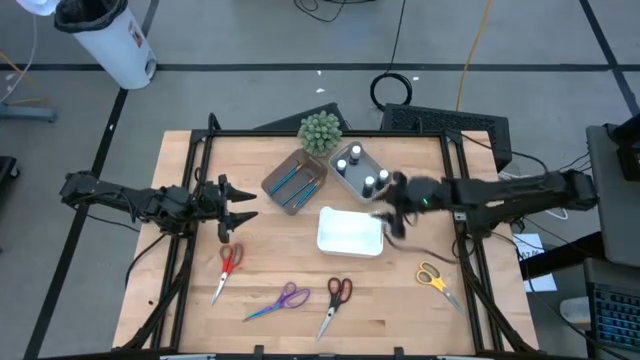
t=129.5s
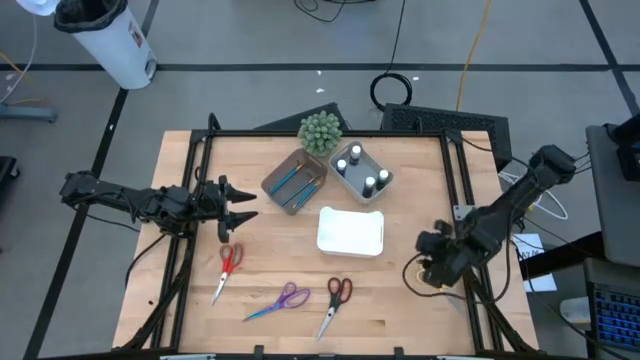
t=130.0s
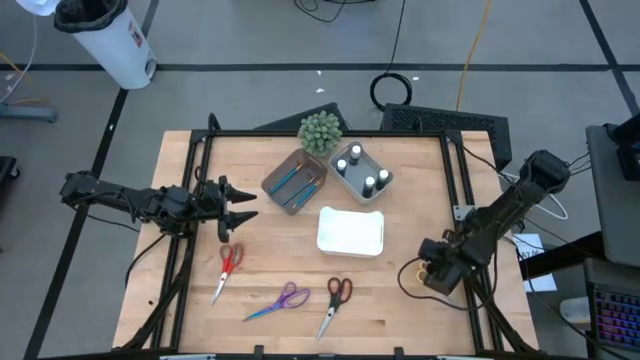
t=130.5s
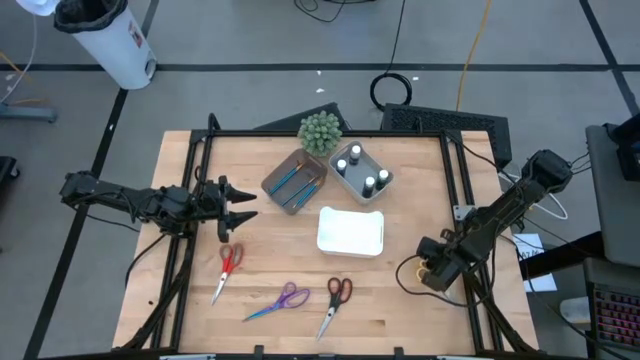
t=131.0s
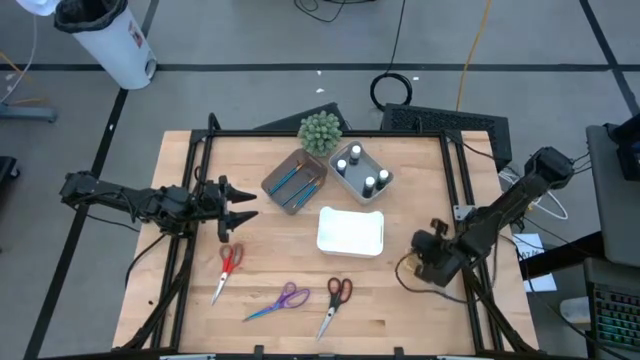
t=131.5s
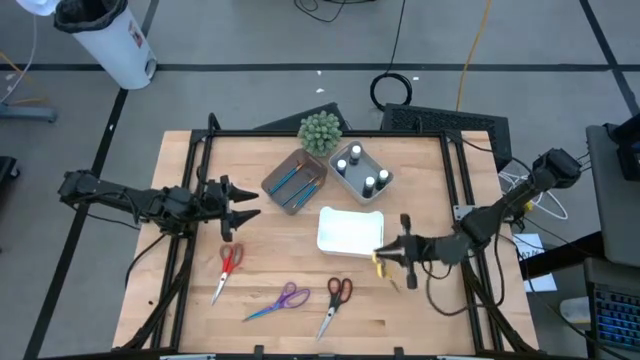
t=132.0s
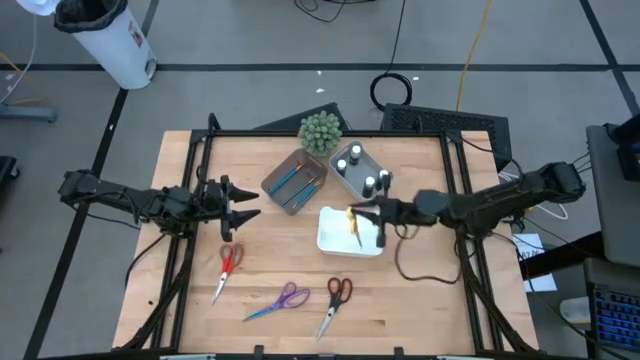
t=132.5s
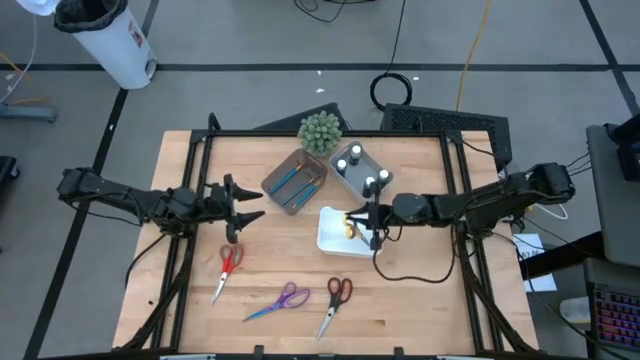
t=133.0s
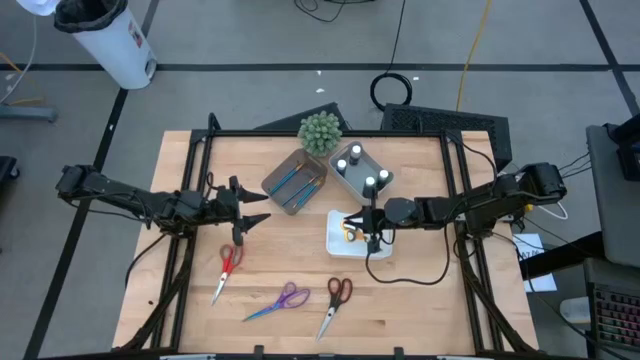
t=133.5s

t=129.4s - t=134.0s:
Task: Pick & Place Paint Supplies
Put the yellow scissors into the white bin

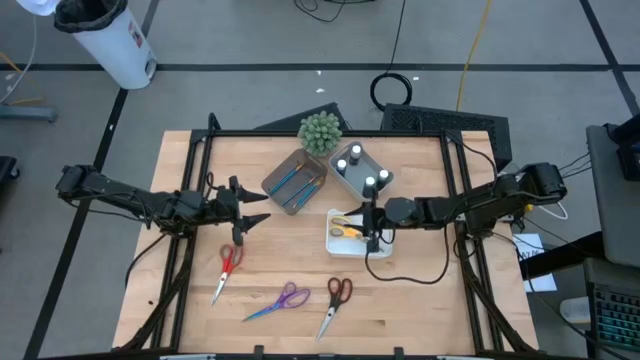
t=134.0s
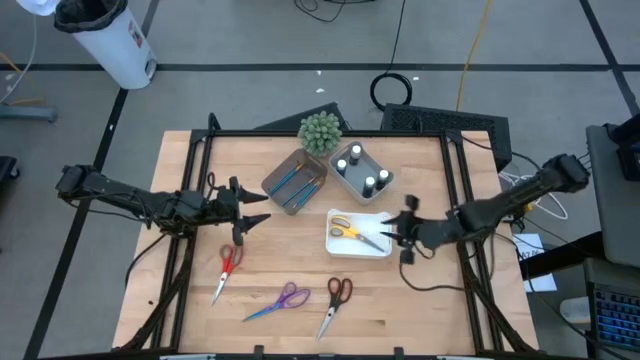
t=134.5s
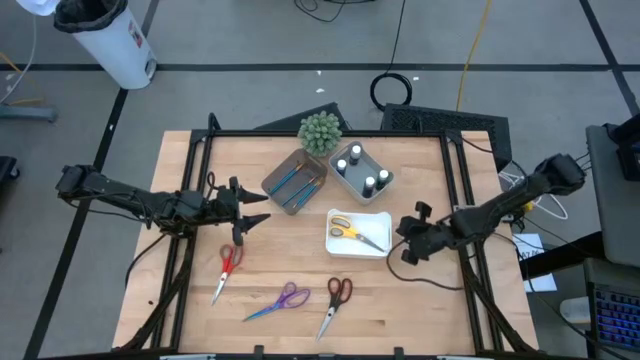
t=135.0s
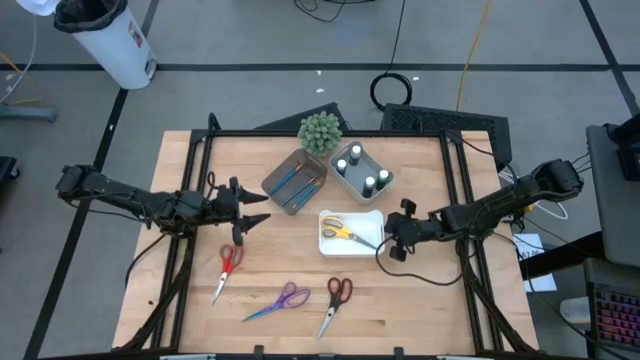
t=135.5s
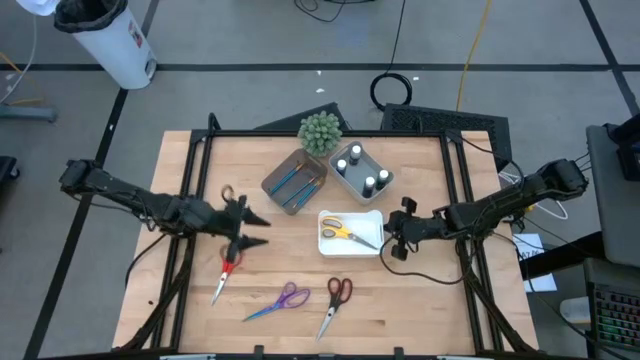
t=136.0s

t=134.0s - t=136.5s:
Adjust the white bin

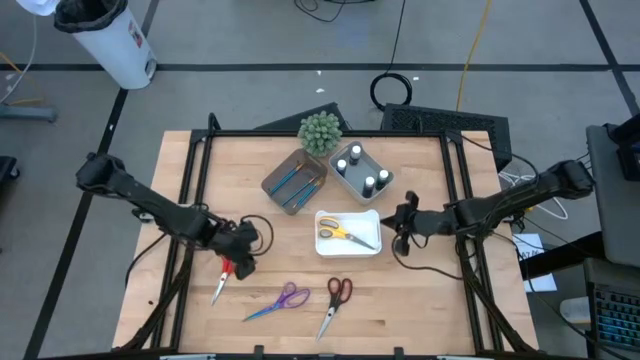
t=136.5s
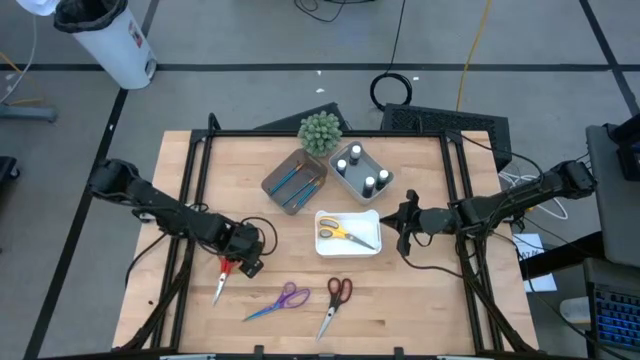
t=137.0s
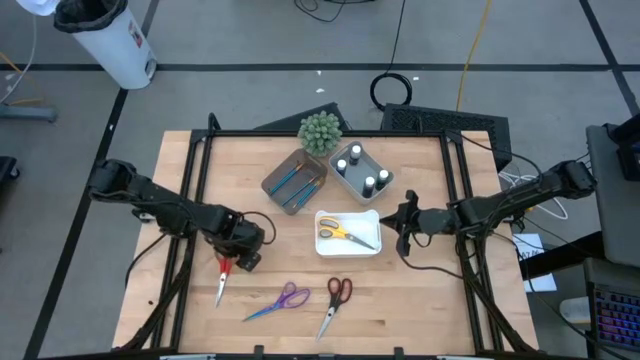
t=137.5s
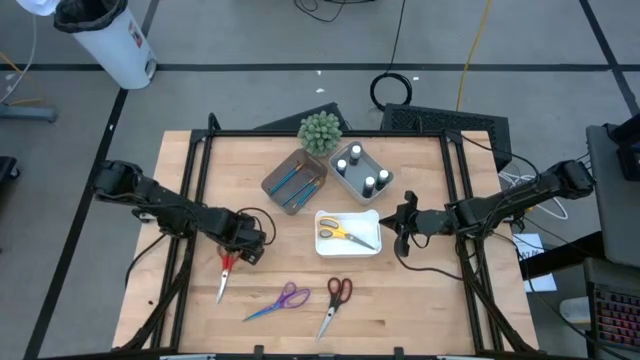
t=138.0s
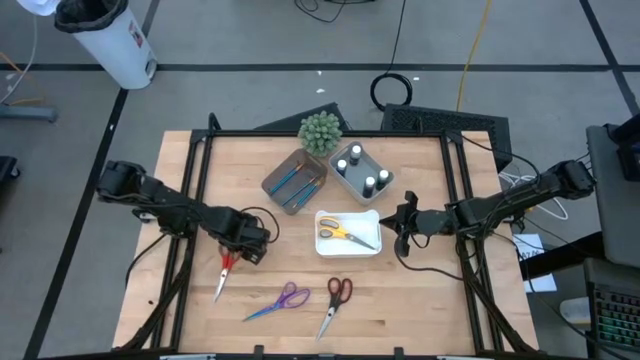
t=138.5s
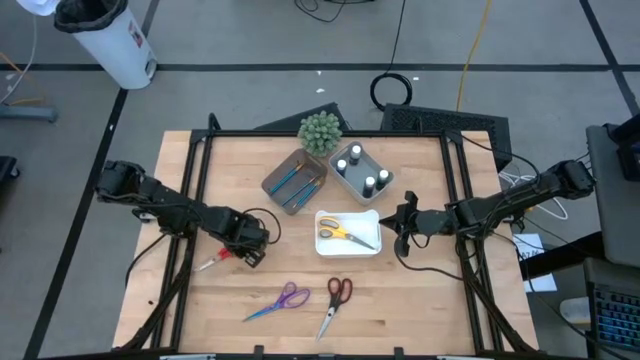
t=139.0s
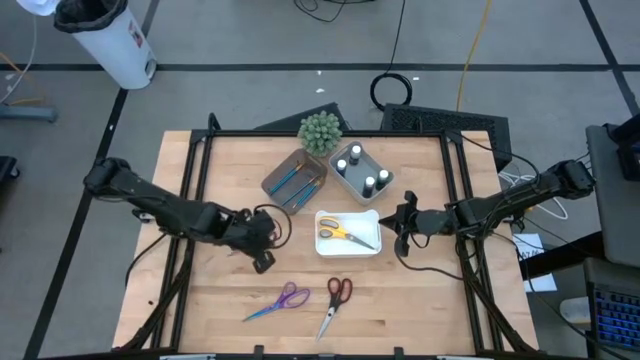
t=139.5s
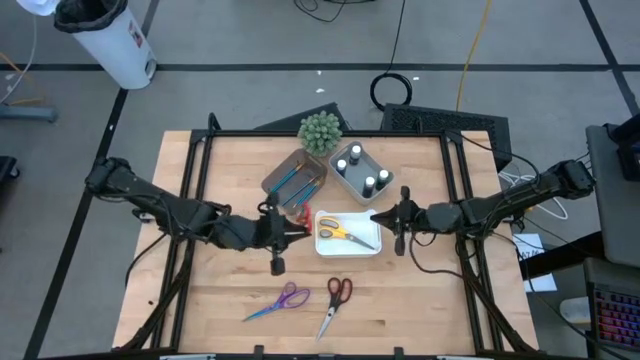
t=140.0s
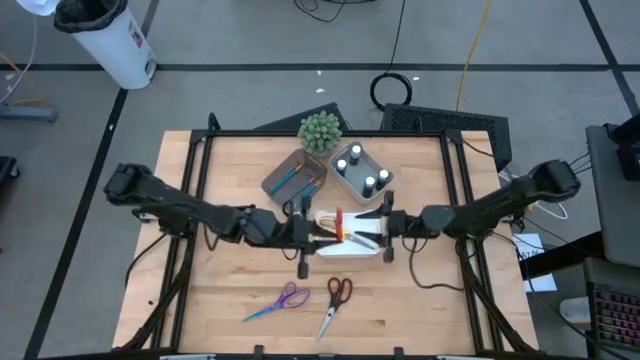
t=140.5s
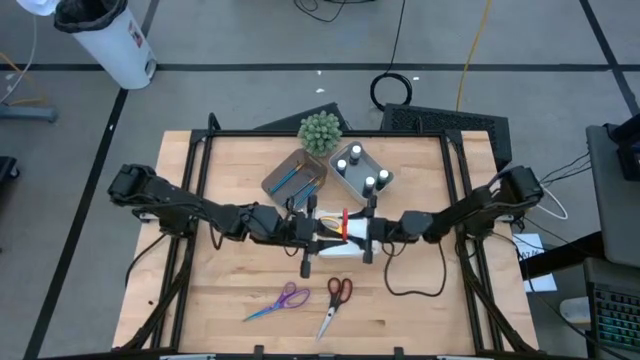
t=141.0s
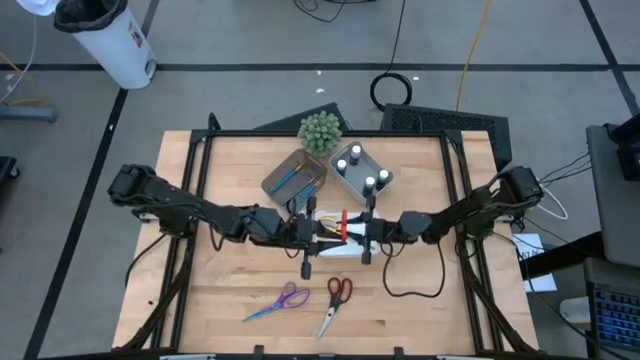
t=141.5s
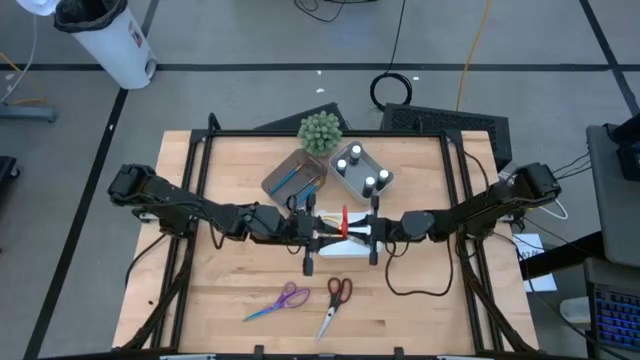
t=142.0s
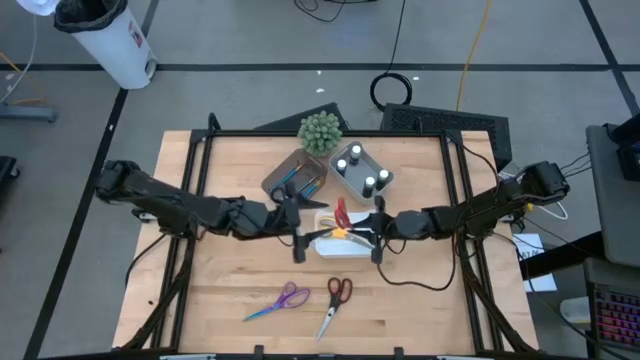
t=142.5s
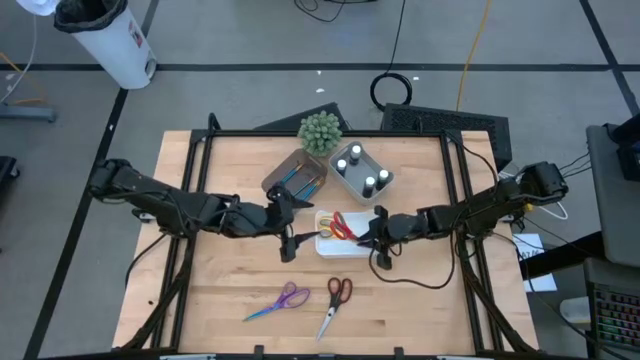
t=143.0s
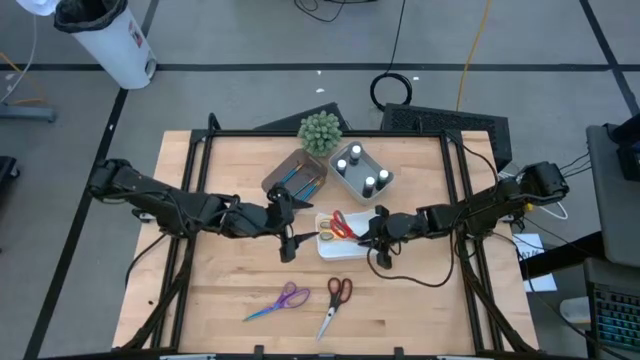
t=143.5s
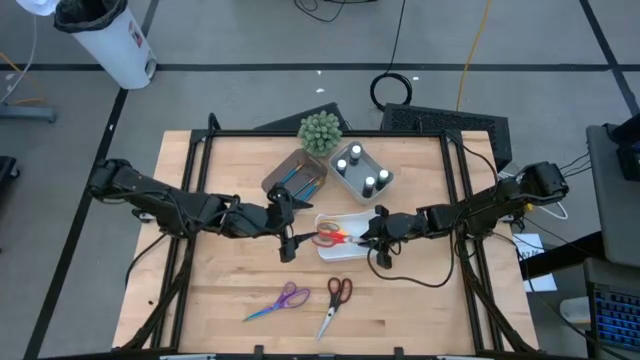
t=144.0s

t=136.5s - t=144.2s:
Put the red scissors into the white bin

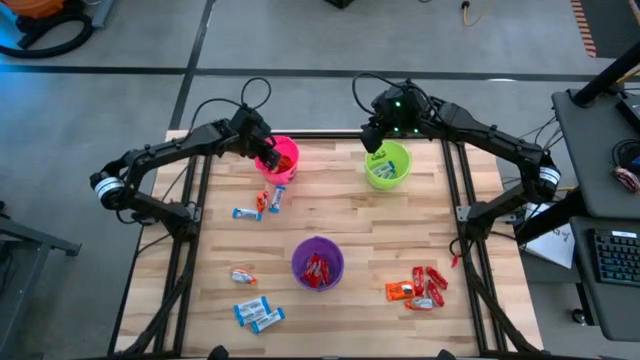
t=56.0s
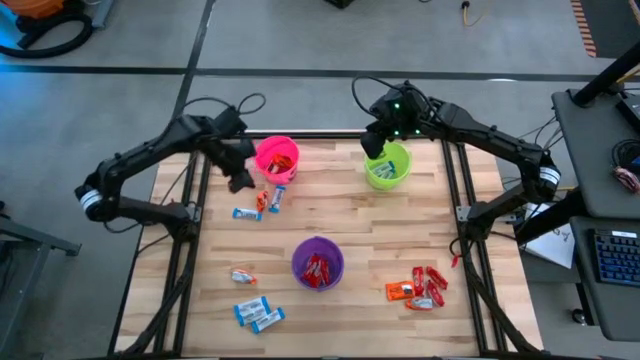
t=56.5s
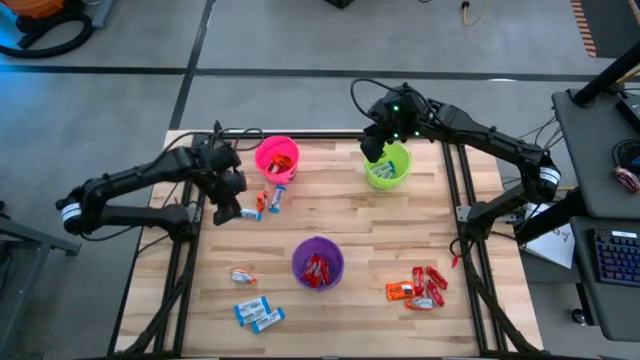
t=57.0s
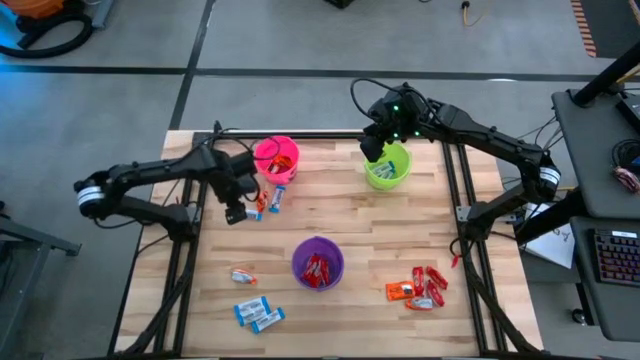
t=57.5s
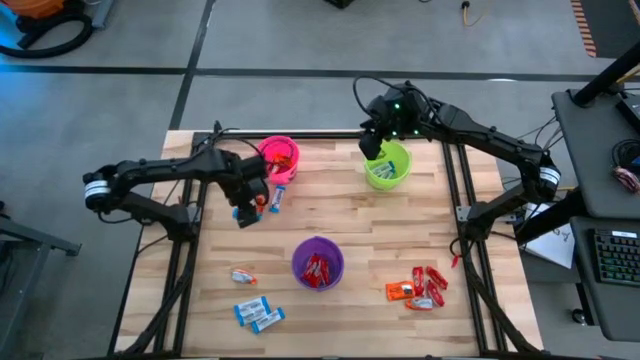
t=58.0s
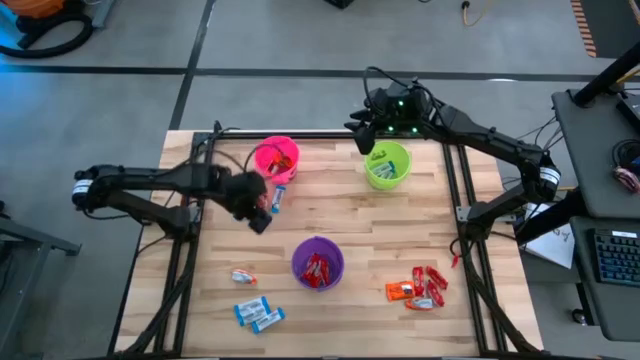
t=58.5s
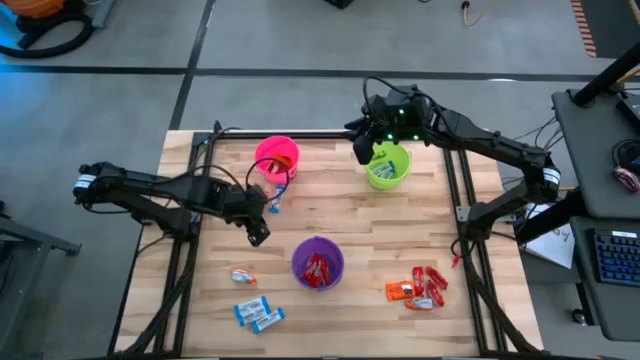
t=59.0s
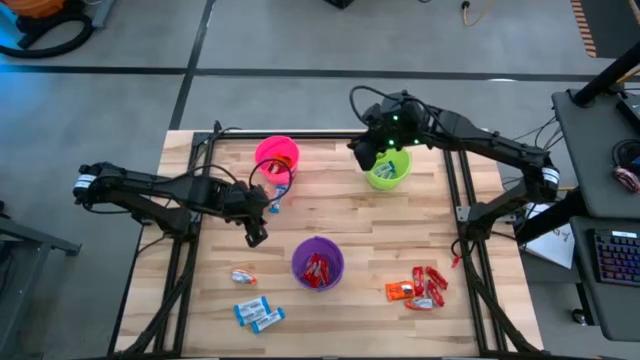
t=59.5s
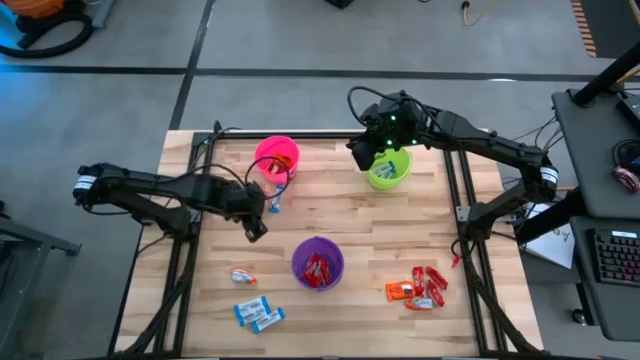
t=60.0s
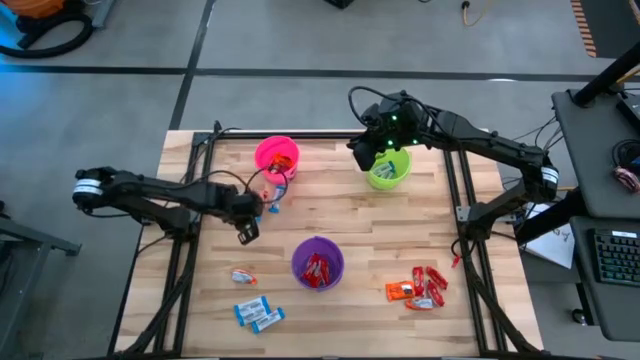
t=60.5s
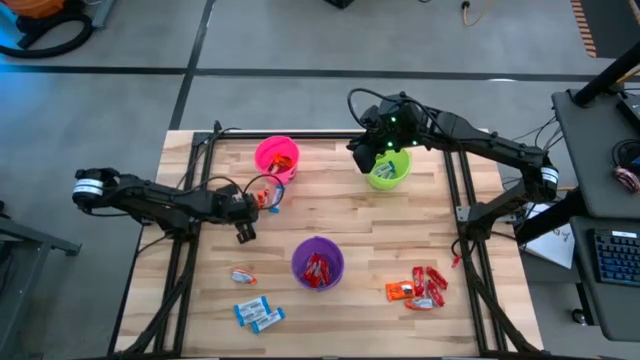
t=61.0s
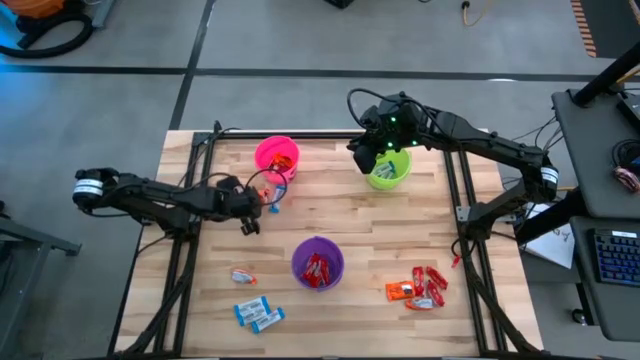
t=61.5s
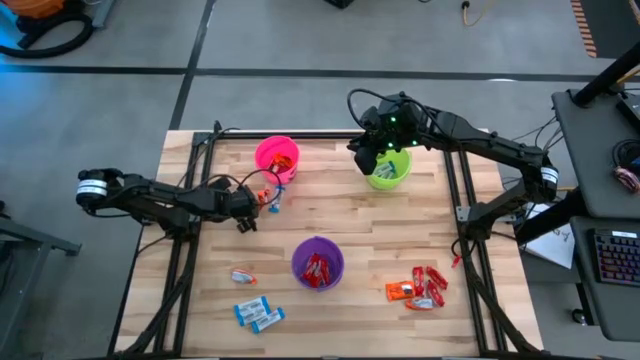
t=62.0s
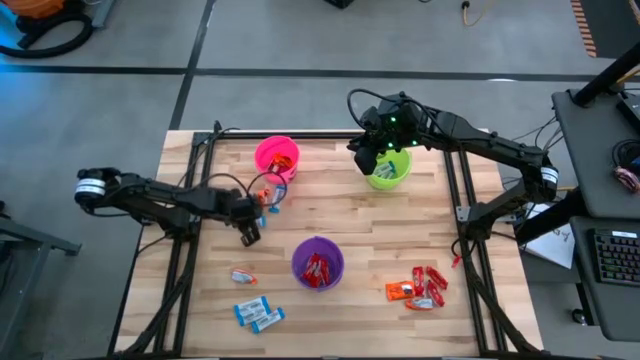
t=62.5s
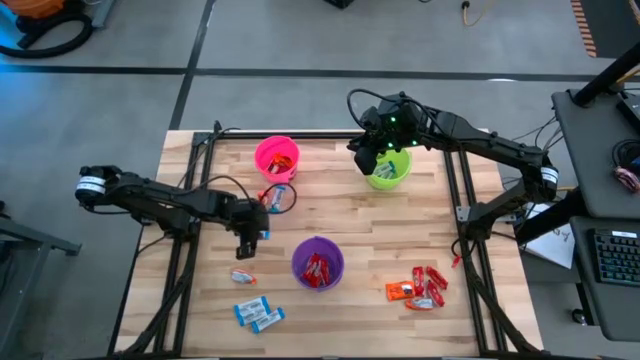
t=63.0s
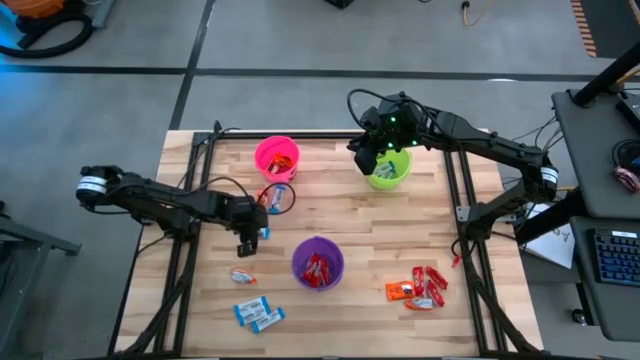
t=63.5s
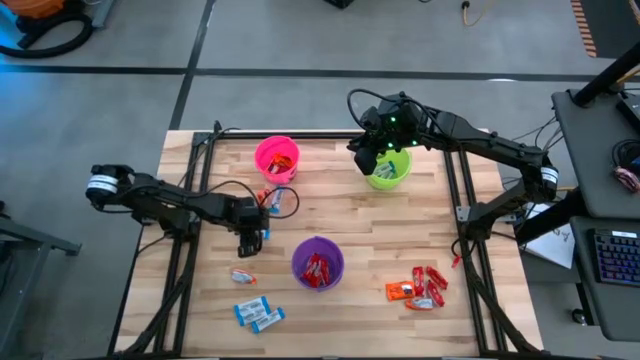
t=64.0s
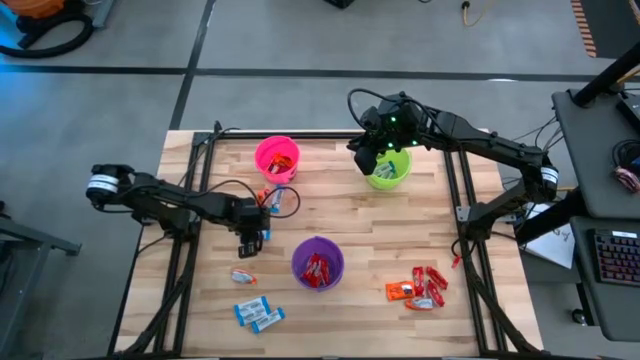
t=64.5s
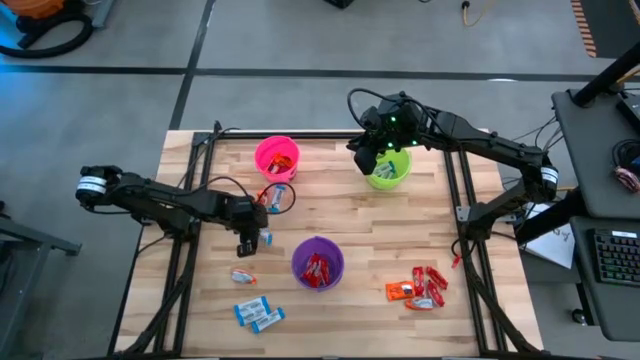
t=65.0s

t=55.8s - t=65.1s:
Task: Sort candy
Put the white-blue chocolate into the green bucket
